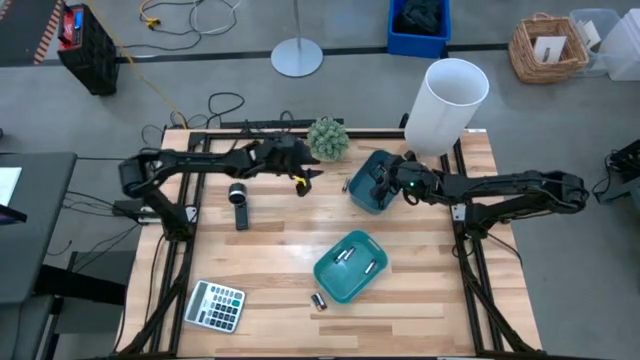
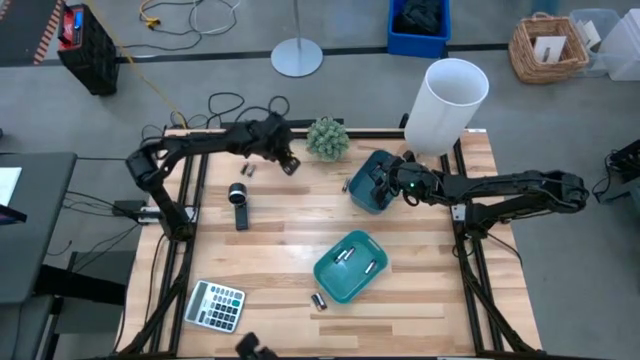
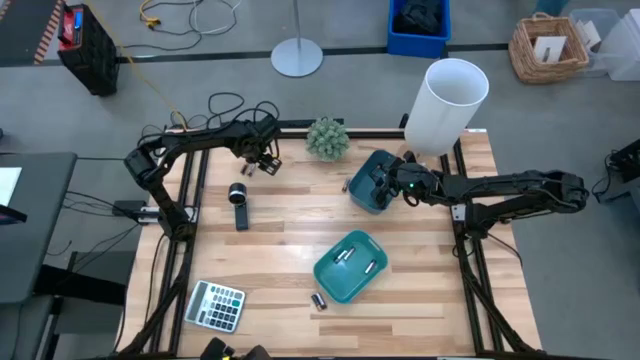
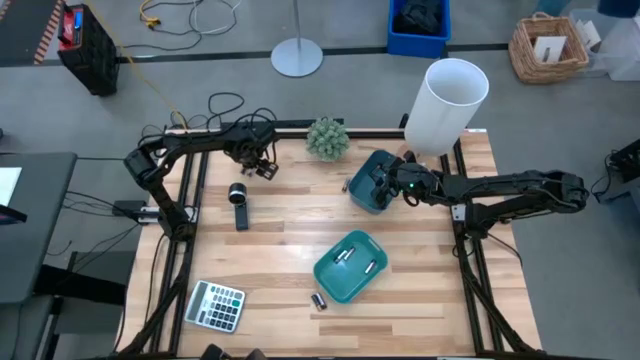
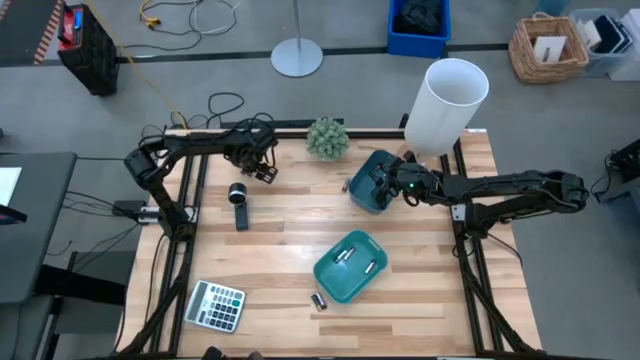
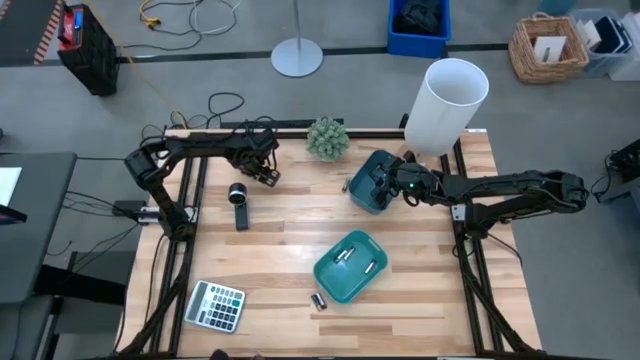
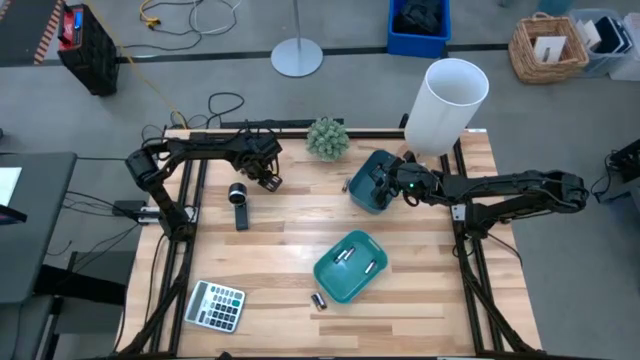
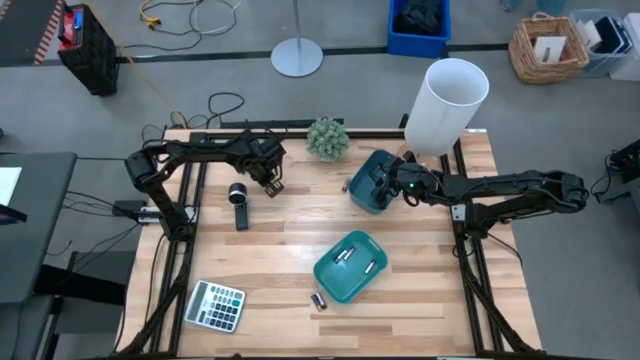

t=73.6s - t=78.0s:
Task: Sort batteries
Put the silver battery into the green bin

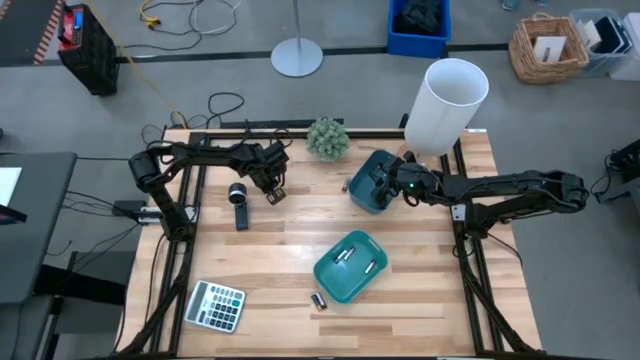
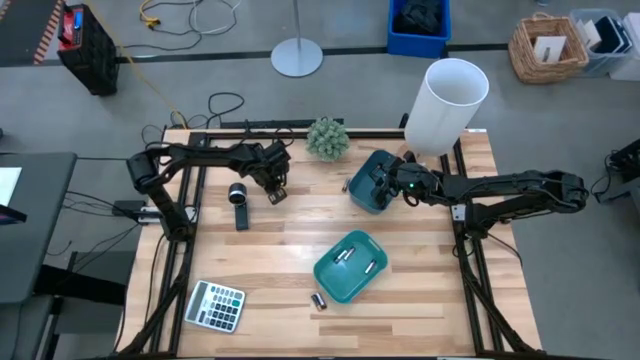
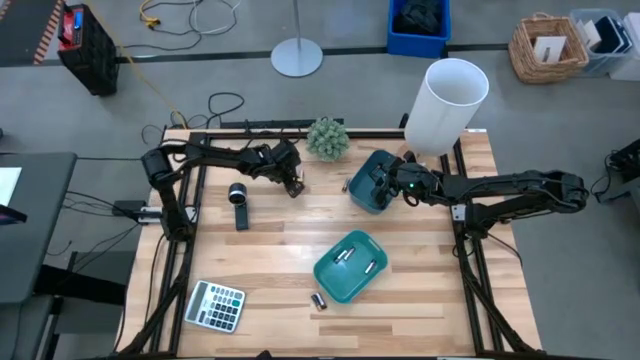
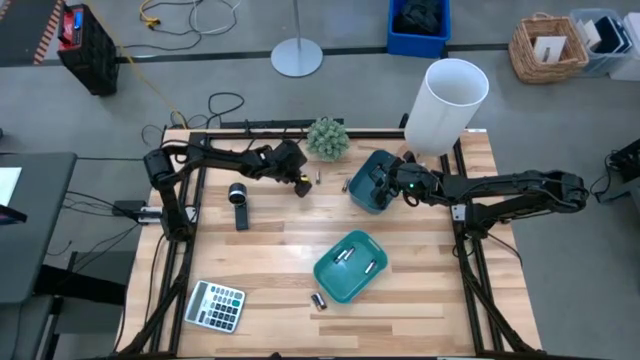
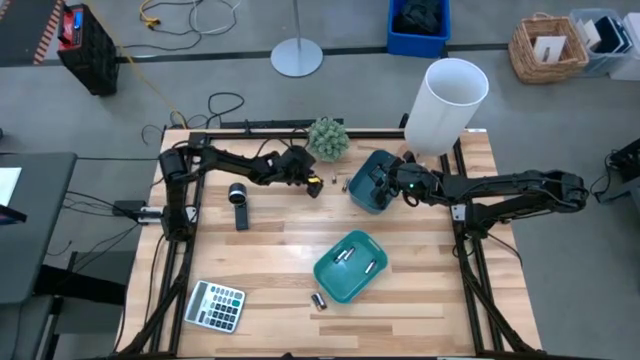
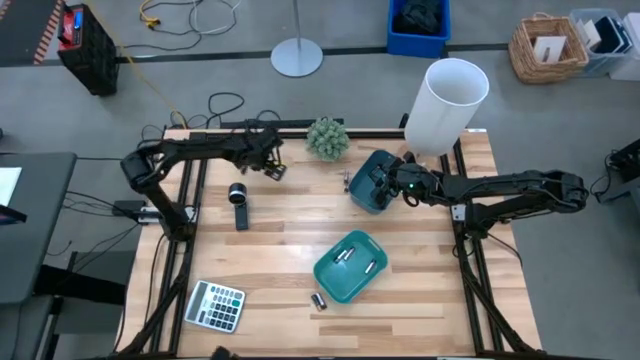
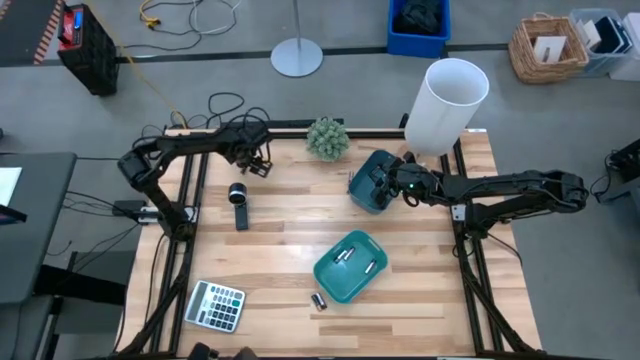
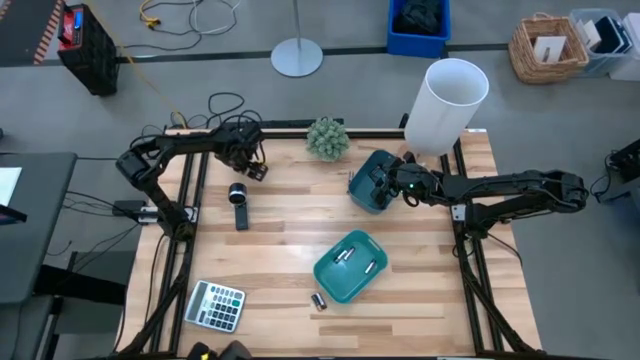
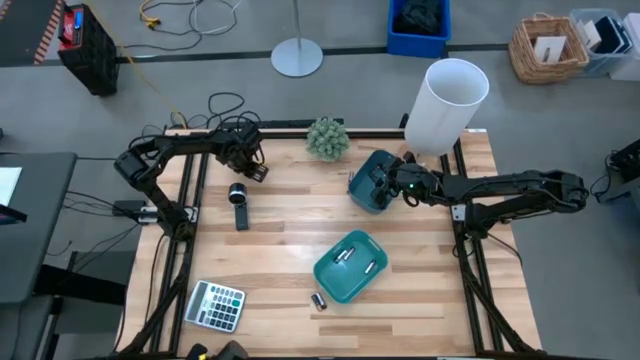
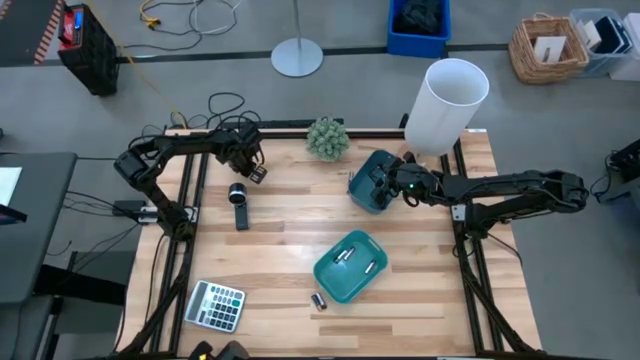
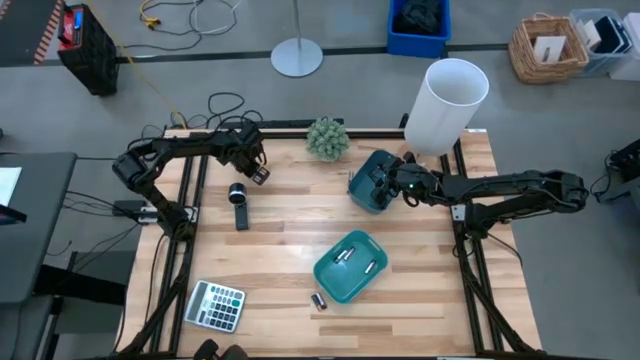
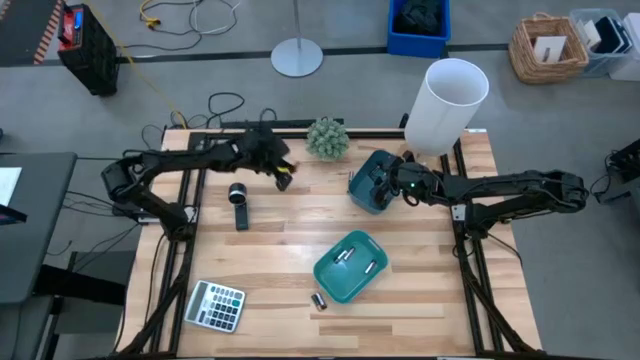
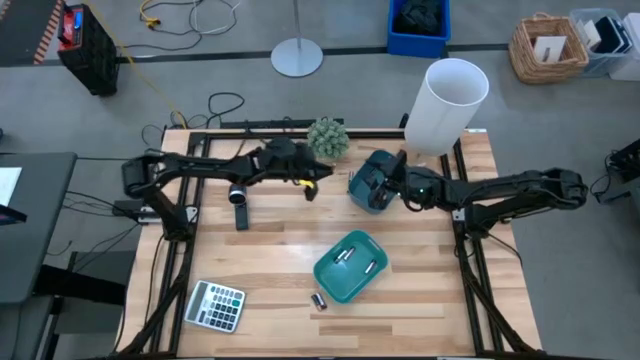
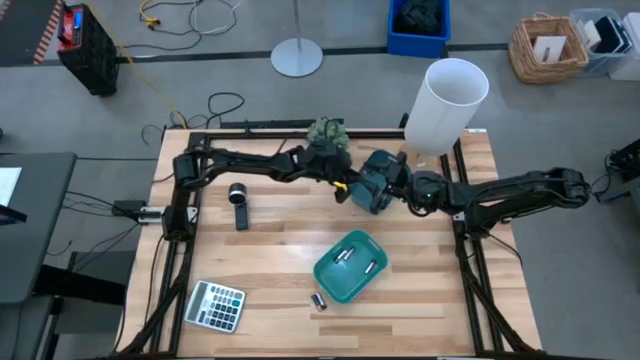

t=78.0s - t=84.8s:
Put the black battery into the blue bin

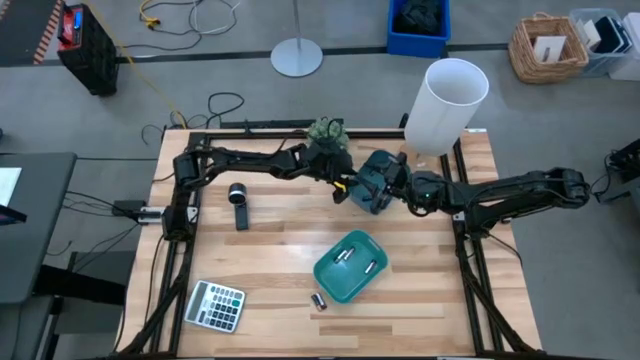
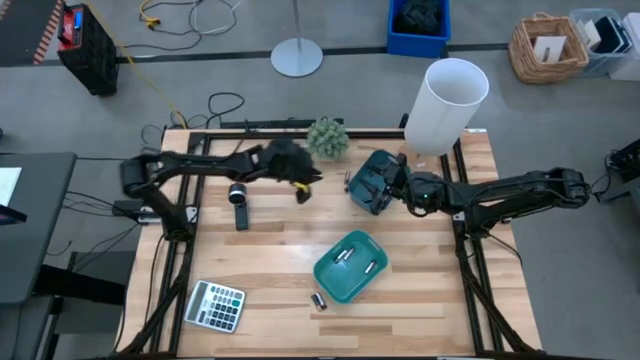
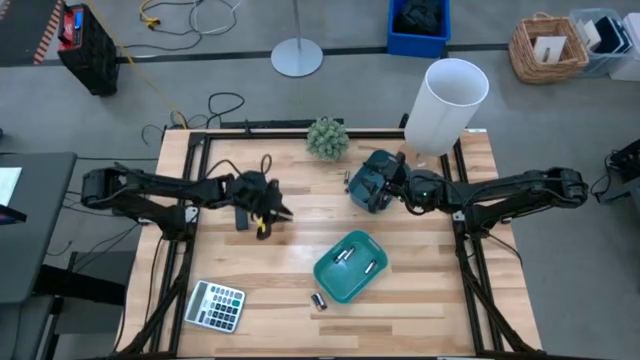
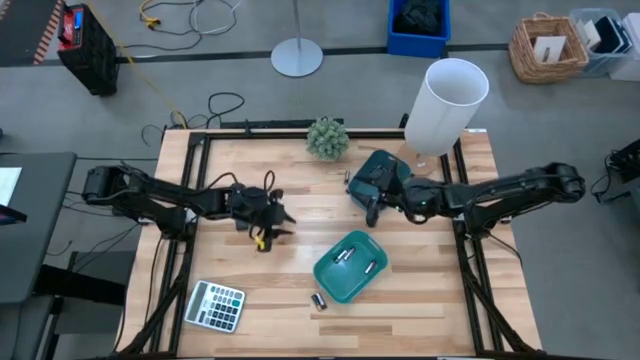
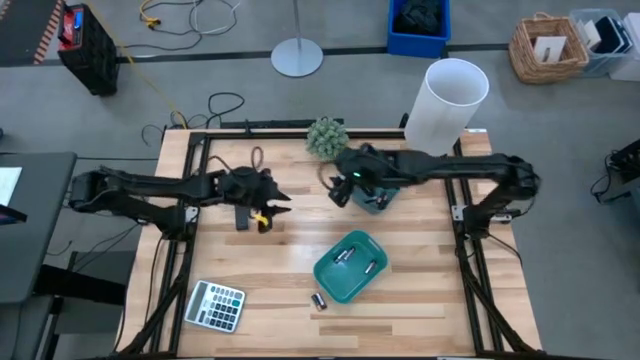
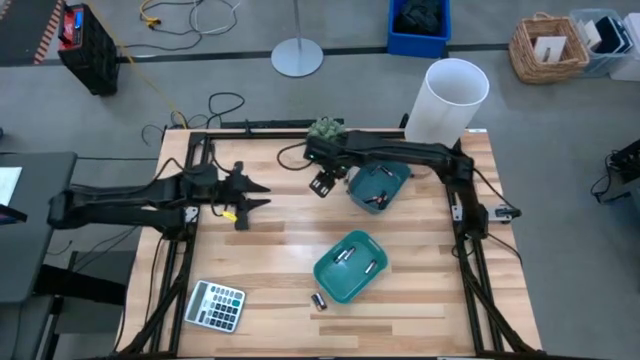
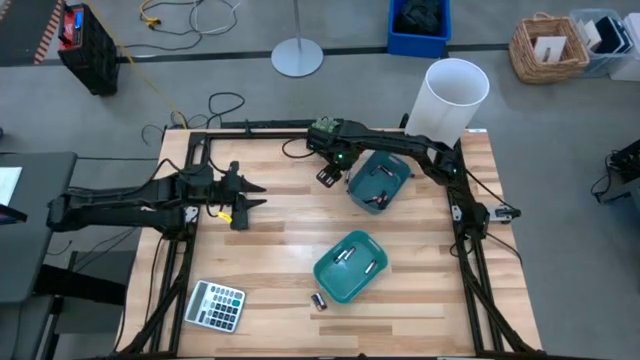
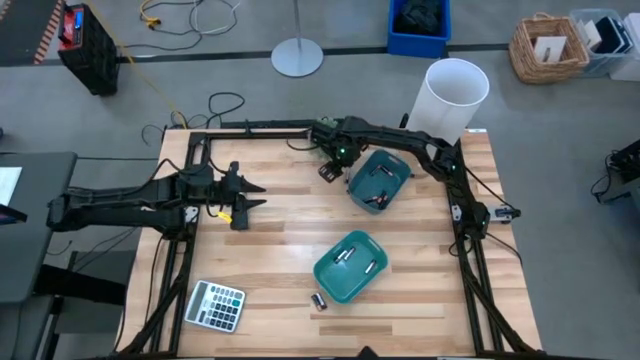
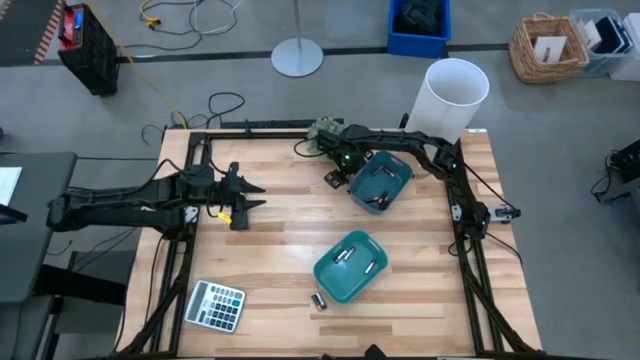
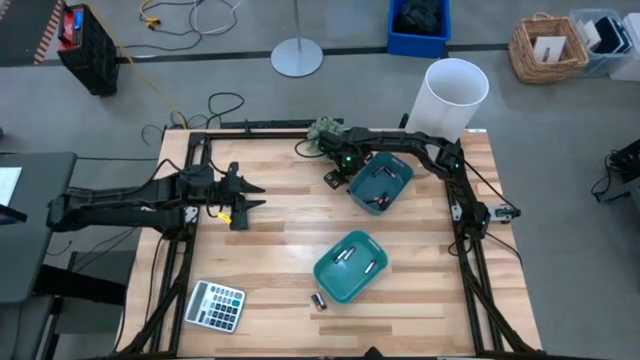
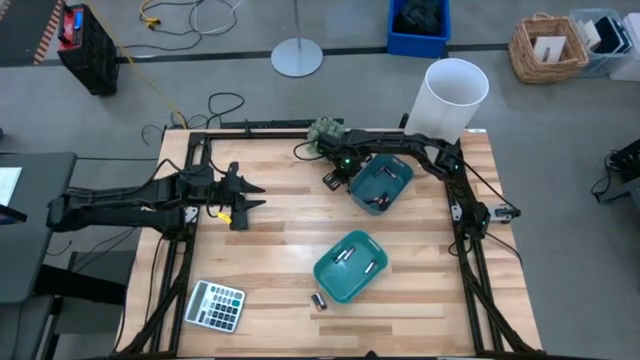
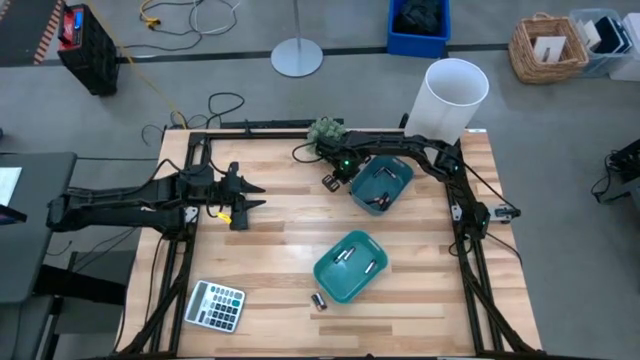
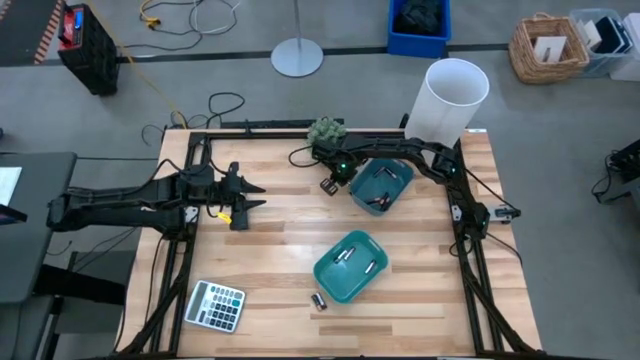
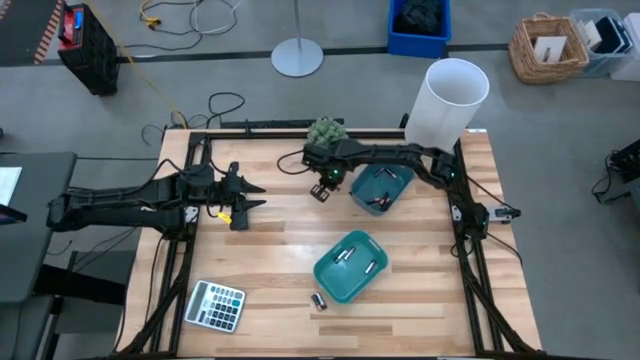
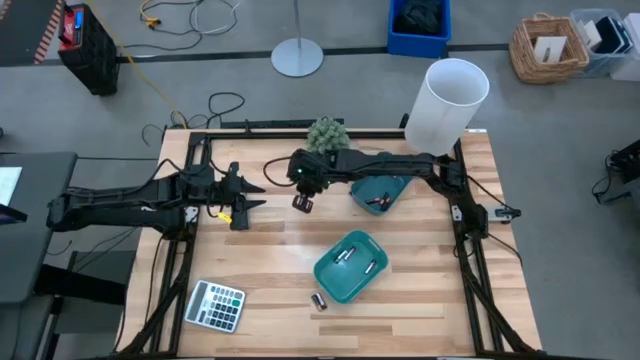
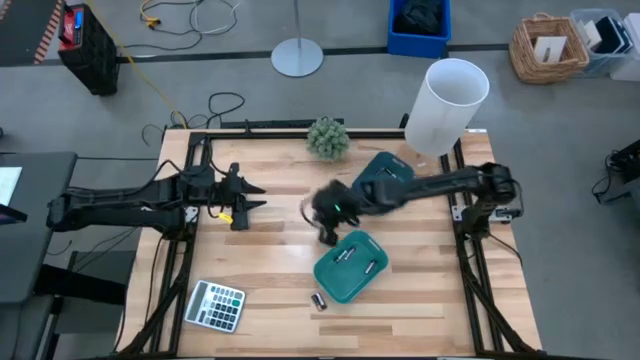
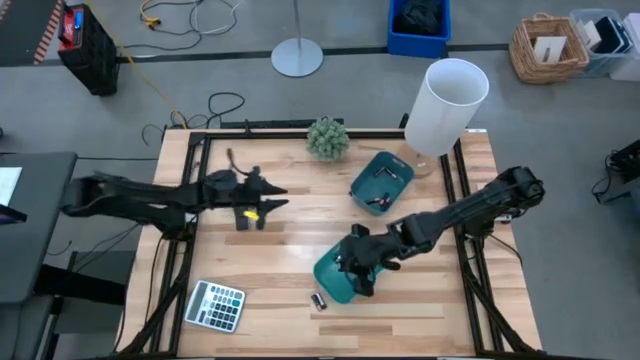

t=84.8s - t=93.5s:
Put the silver battery into the green bin
